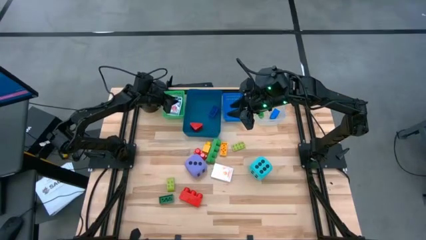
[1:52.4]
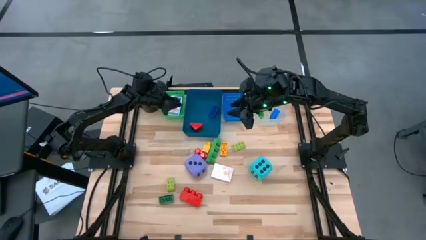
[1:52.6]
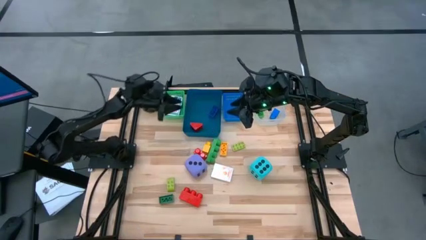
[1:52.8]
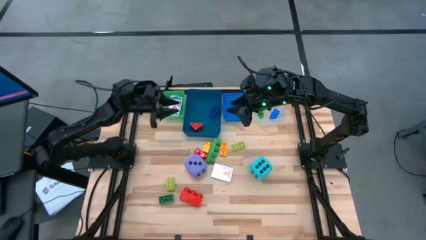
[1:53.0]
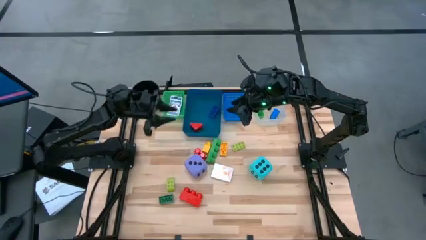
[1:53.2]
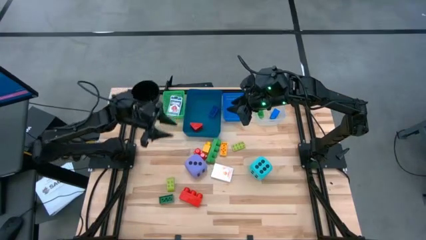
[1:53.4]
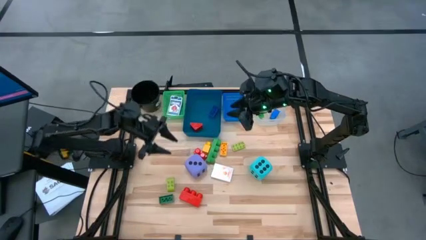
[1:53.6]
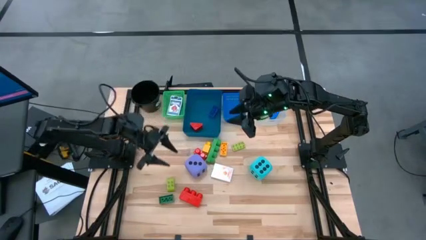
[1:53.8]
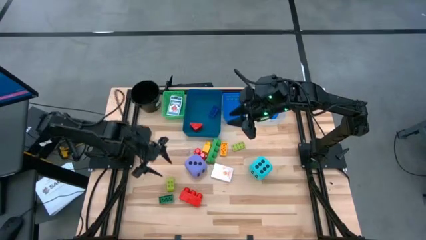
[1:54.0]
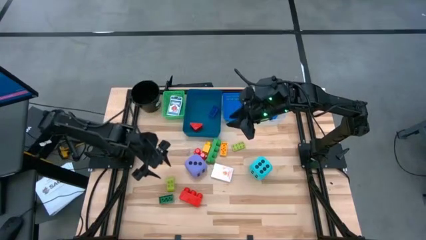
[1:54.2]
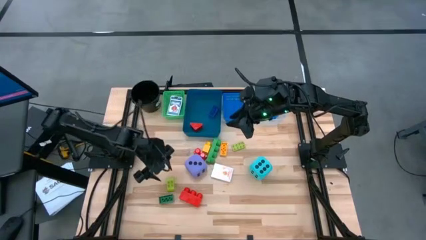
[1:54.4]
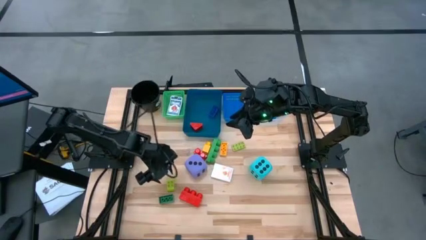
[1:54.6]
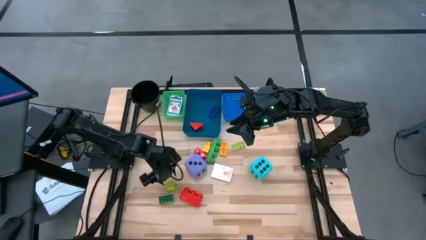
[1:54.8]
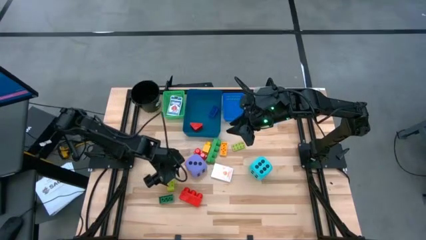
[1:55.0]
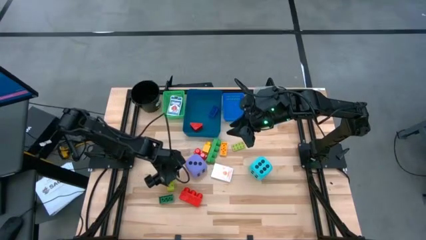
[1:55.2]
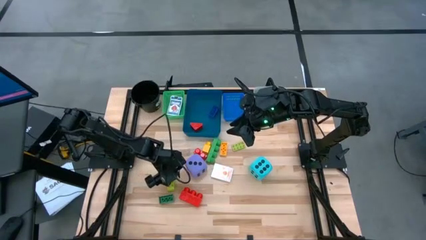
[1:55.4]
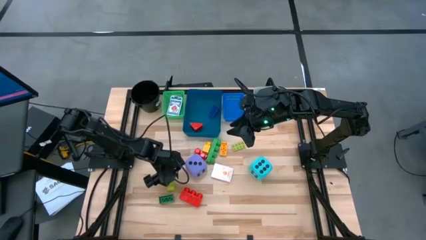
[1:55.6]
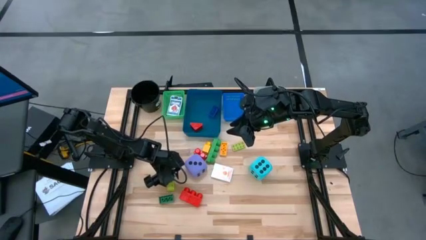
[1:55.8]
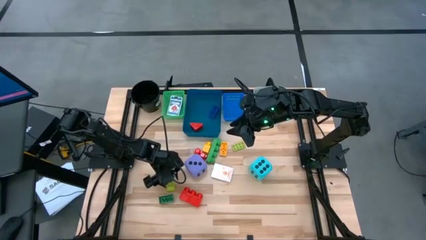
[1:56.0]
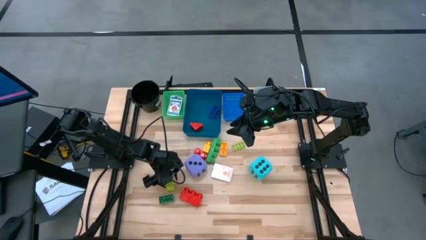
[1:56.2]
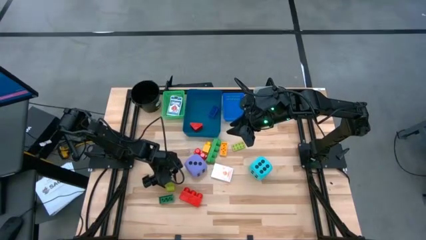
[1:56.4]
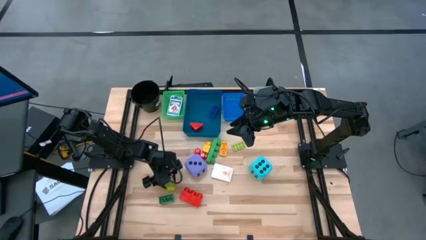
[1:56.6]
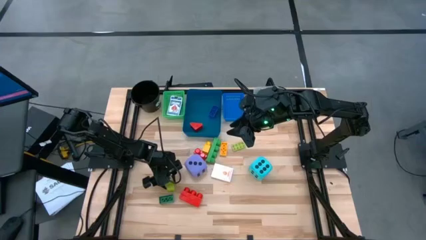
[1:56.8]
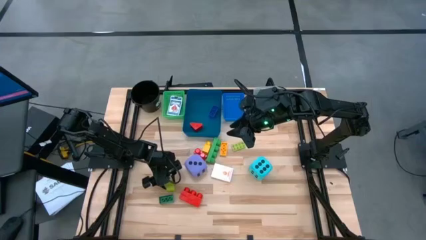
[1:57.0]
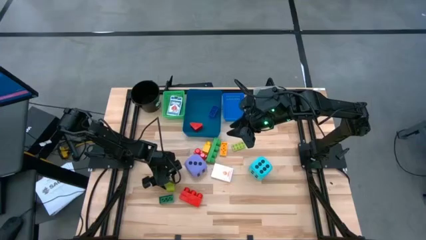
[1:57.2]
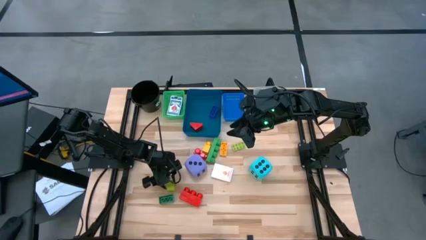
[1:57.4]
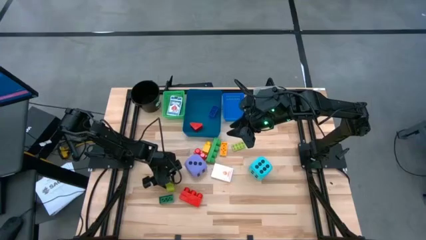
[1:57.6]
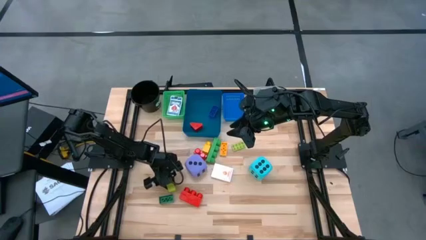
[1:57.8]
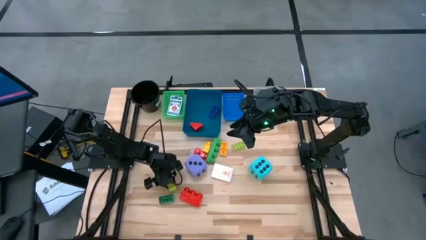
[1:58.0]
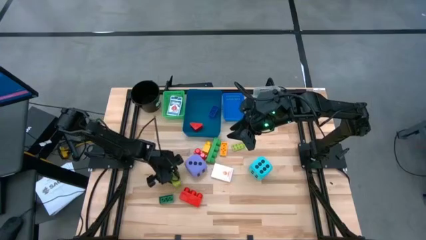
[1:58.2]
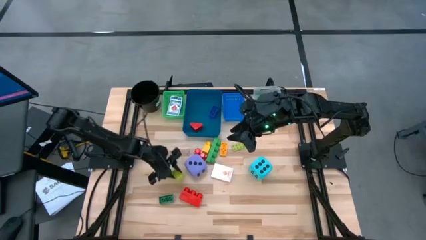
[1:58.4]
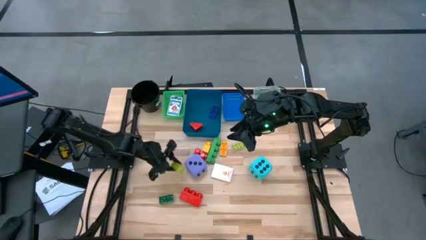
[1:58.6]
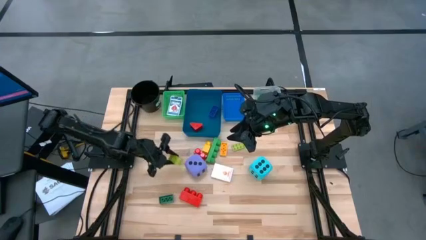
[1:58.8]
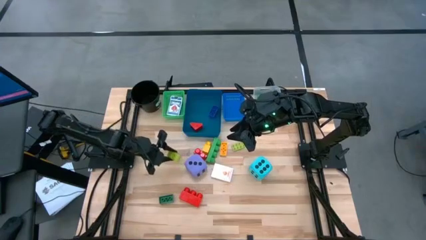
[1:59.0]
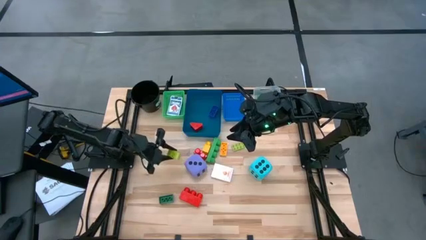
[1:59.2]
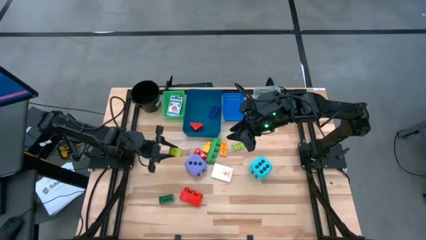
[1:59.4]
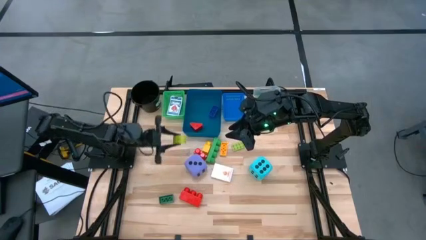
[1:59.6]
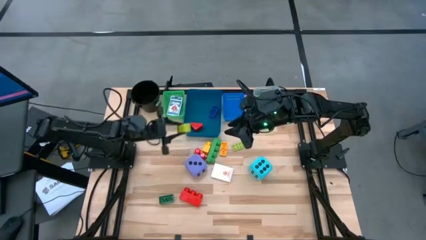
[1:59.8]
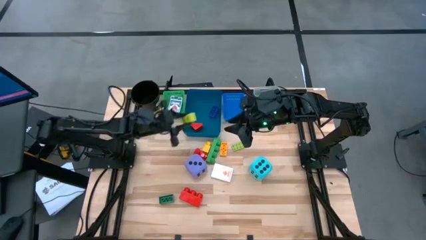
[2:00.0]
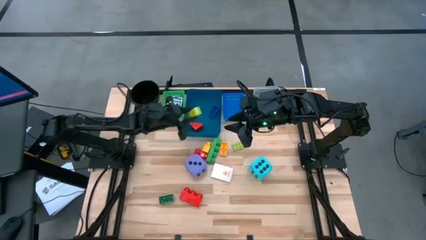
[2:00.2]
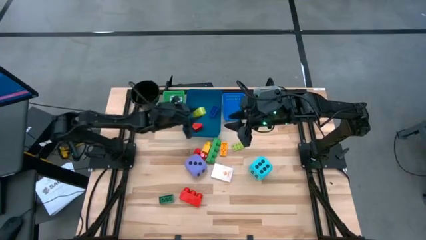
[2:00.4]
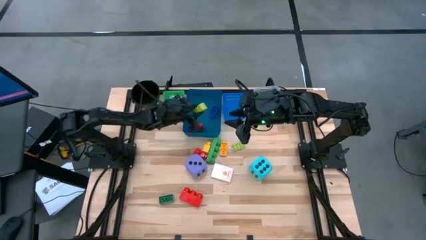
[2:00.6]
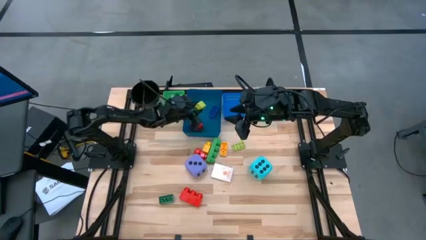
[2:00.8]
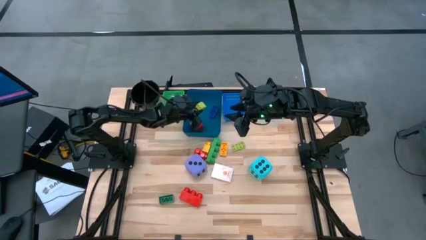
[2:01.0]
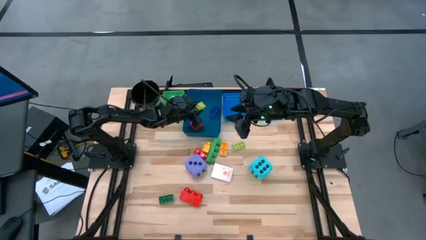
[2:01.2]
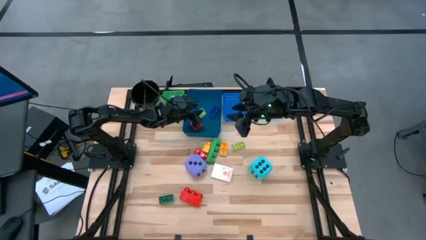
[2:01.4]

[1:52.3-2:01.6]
Task: Pick & Place Toys
Put the small light green game piece into the dark blue bin

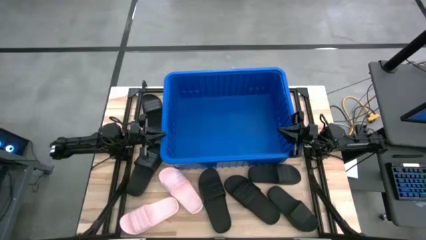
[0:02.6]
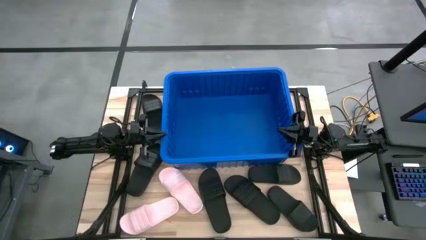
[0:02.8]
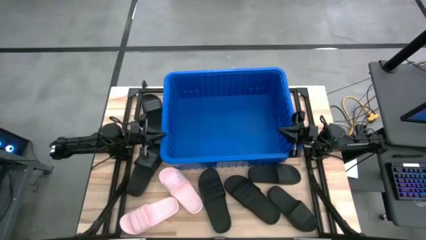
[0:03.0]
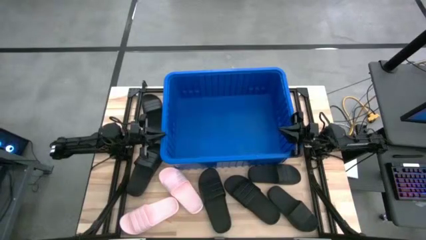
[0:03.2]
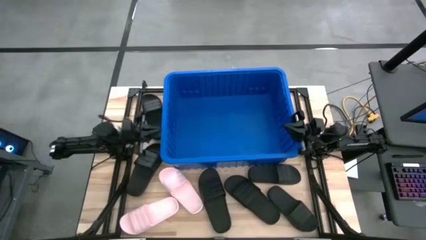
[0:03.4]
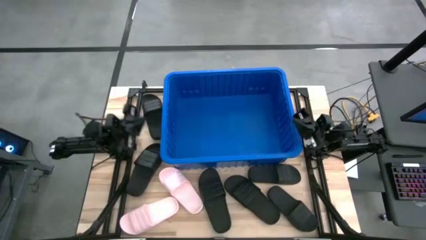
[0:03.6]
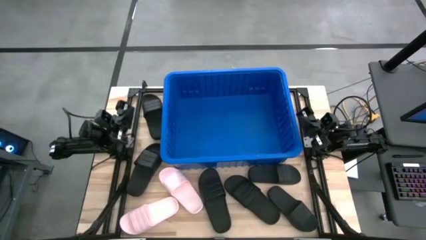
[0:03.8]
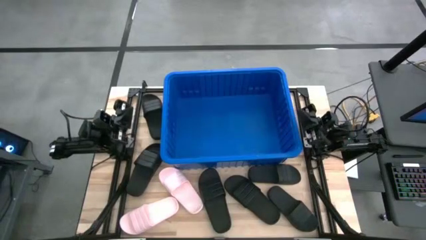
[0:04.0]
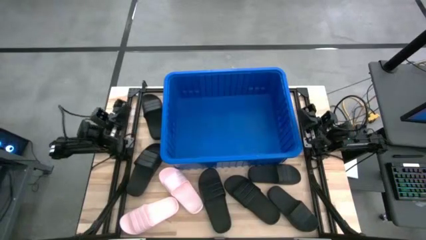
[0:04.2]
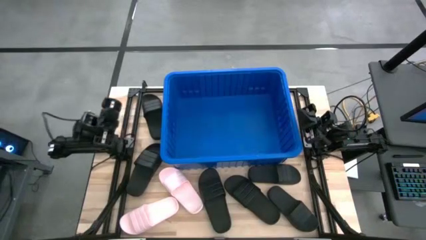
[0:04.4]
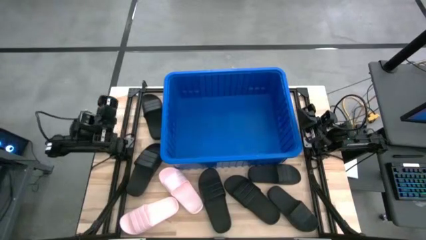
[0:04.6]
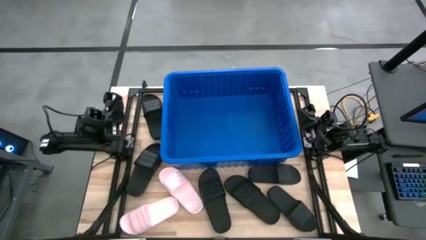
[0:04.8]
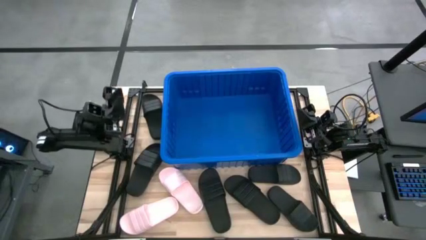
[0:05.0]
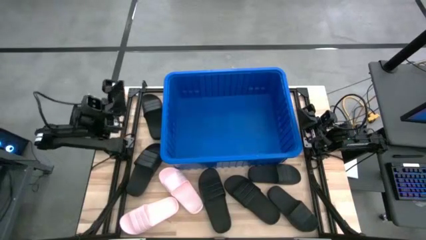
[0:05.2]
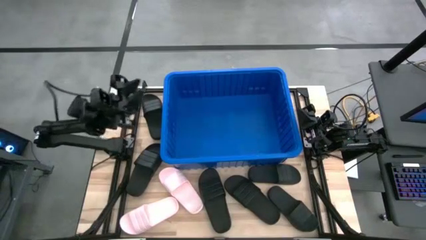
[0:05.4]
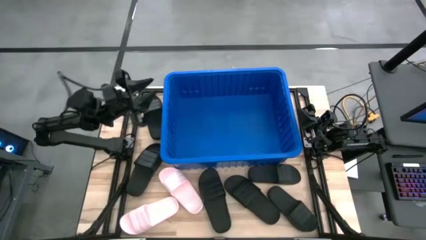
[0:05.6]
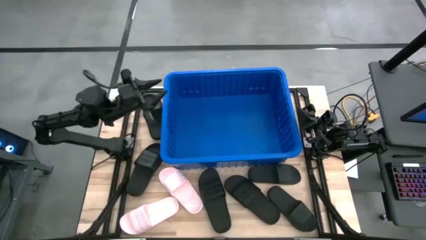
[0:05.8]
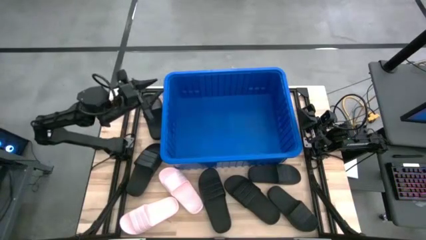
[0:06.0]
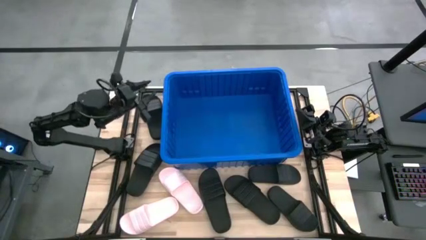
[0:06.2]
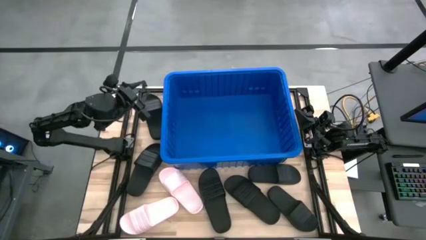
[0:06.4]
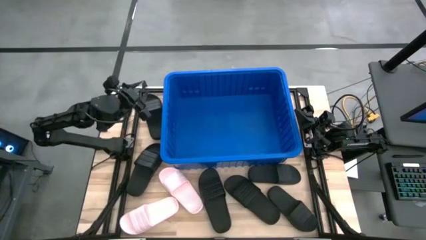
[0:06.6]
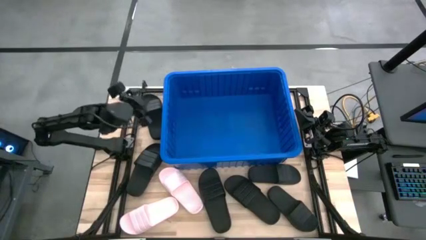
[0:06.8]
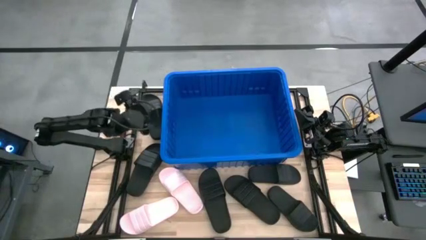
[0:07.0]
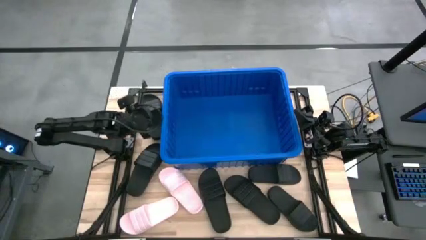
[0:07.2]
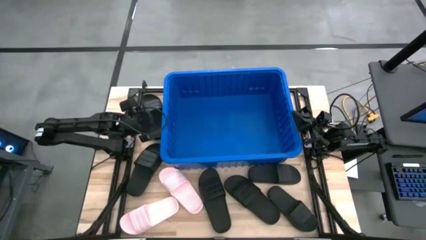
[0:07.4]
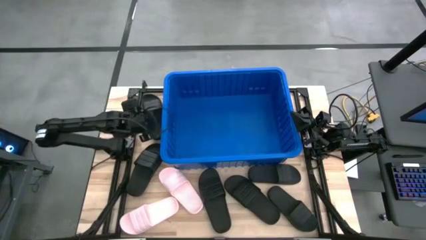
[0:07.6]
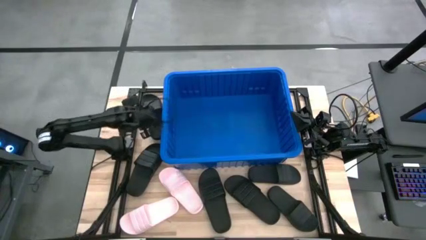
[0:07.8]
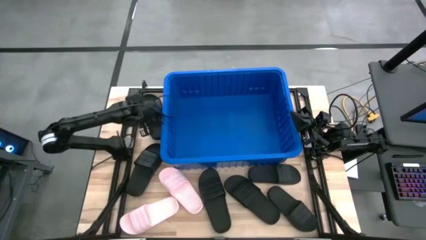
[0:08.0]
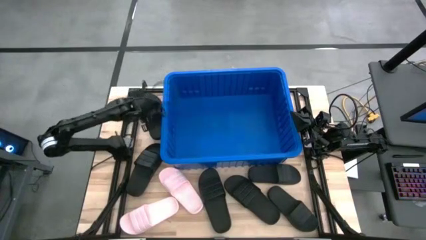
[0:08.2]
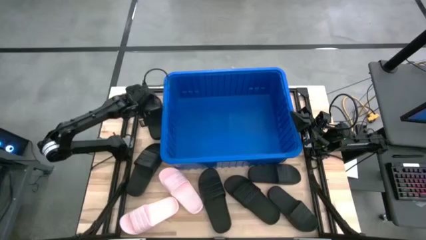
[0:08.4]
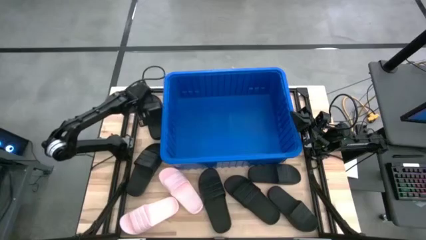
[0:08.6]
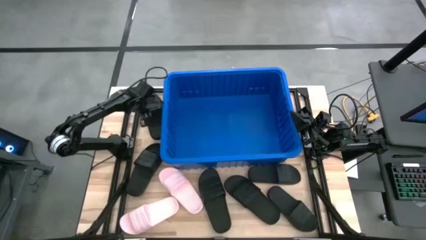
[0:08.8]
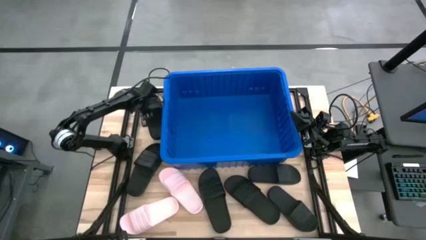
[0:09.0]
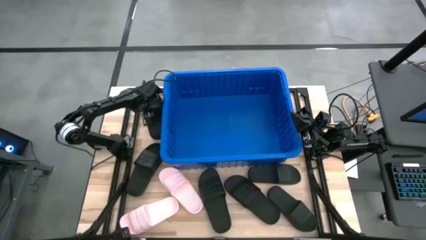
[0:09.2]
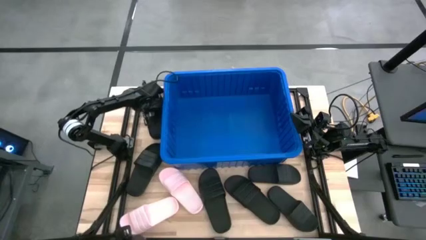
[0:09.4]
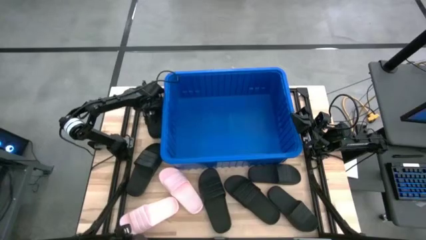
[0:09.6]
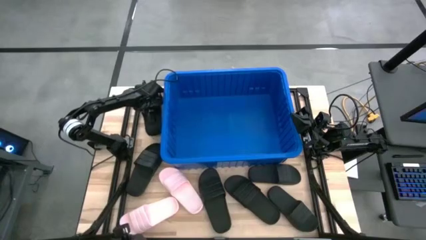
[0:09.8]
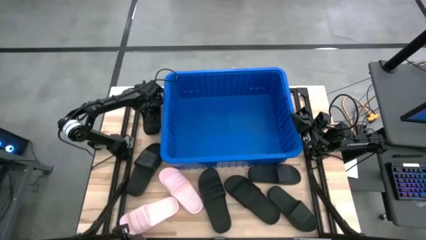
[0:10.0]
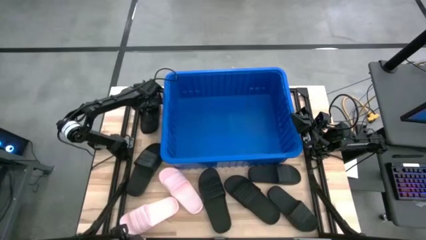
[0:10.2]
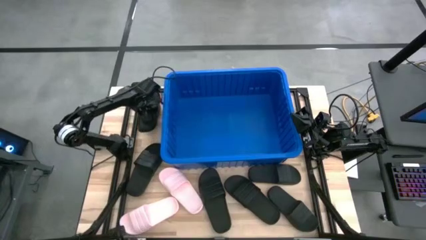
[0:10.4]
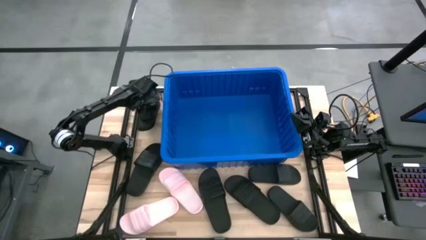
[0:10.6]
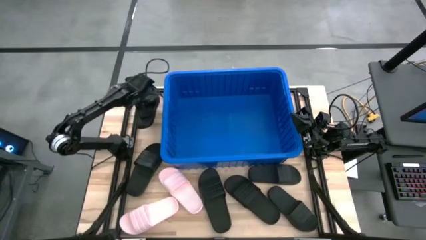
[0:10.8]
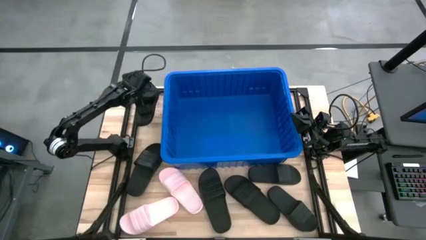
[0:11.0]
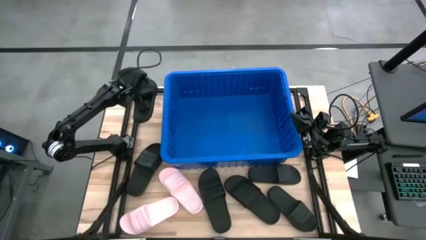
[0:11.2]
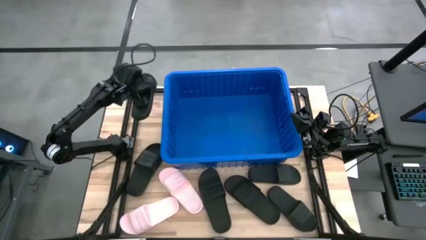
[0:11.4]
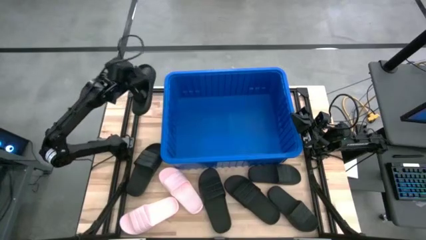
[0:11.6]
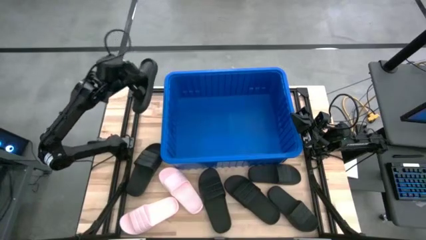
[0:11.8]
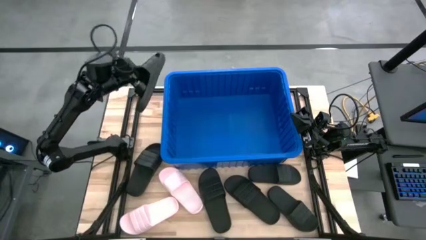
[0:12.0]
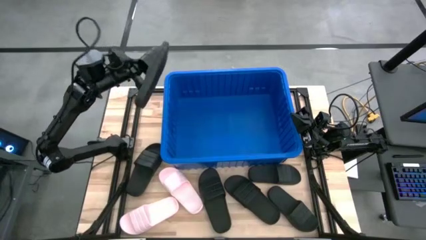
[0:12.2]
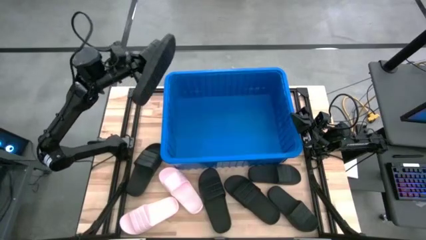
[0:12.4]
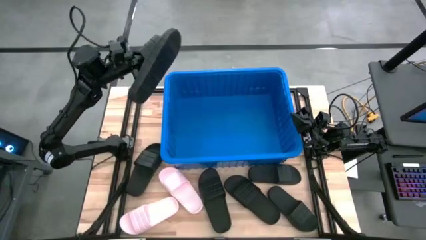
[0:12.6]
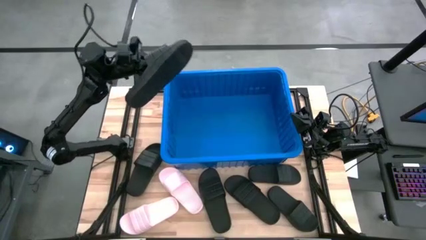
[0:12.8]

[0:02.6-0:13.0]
Task: Pick and place slides into bin
Put the black slide into the blue bin
